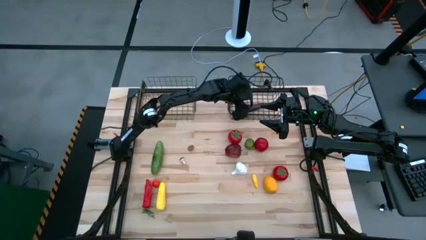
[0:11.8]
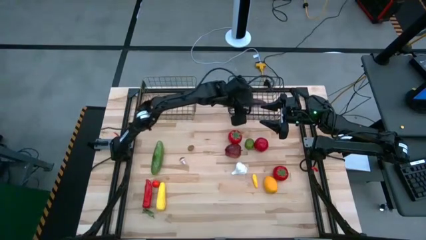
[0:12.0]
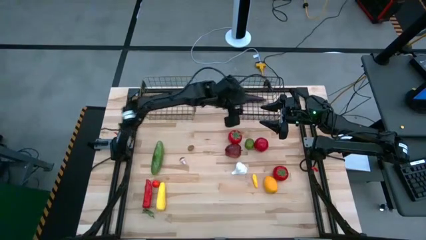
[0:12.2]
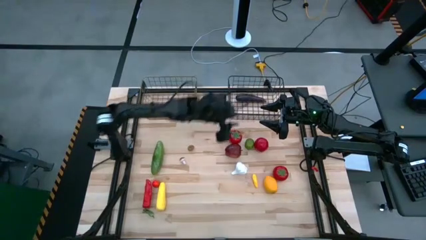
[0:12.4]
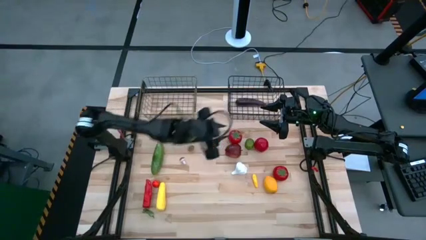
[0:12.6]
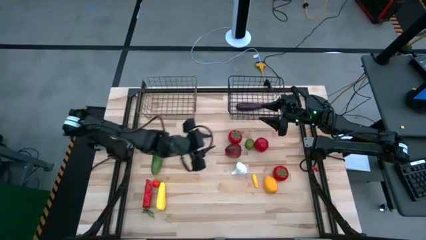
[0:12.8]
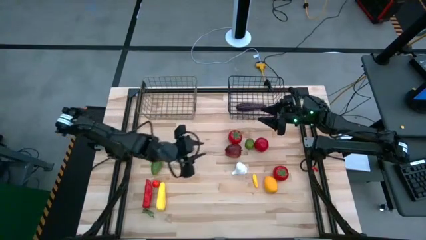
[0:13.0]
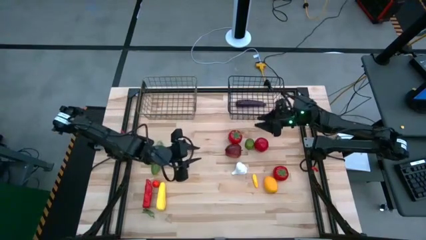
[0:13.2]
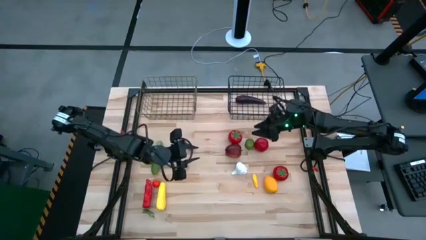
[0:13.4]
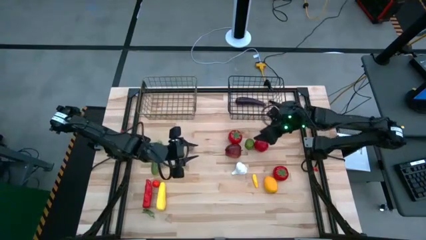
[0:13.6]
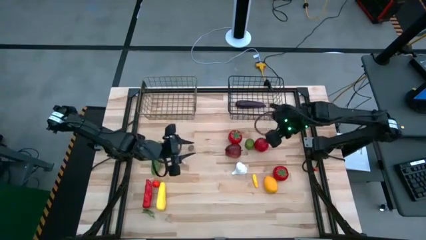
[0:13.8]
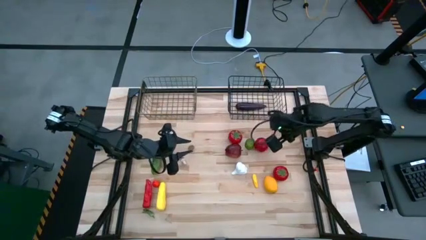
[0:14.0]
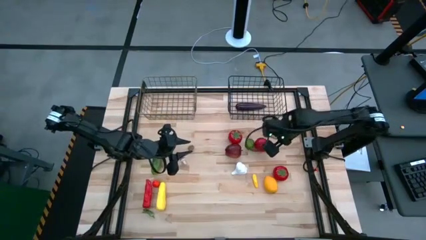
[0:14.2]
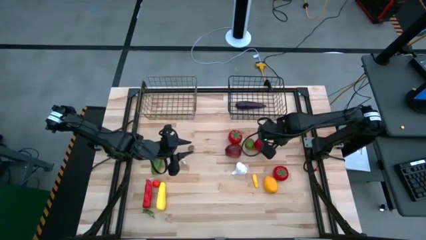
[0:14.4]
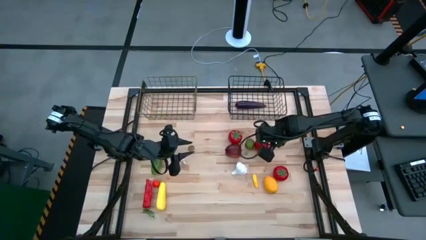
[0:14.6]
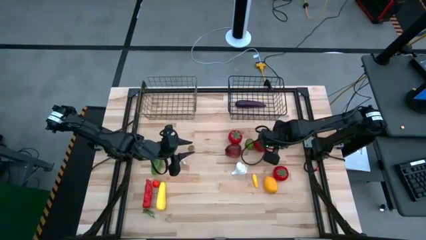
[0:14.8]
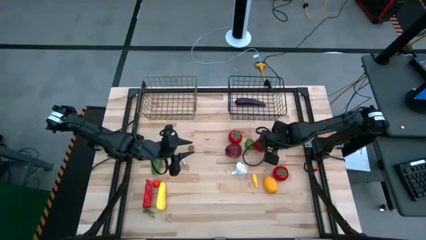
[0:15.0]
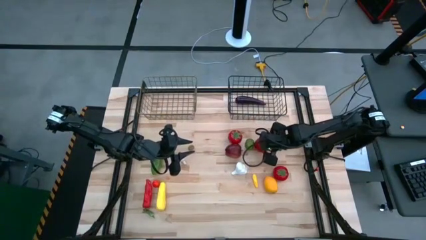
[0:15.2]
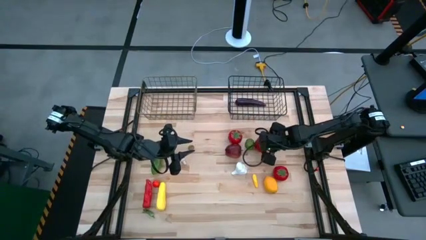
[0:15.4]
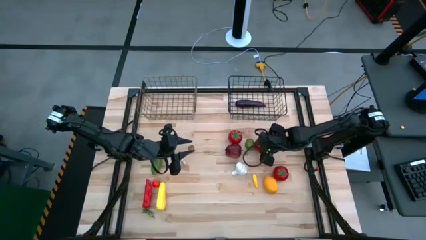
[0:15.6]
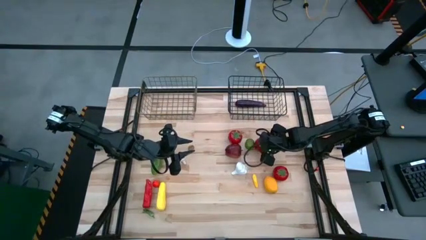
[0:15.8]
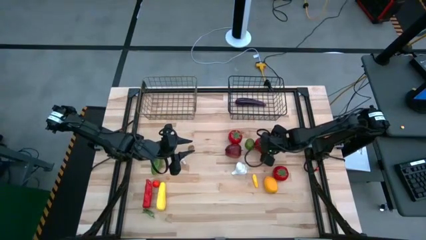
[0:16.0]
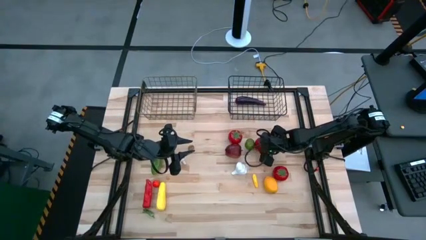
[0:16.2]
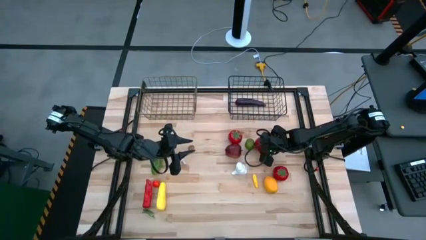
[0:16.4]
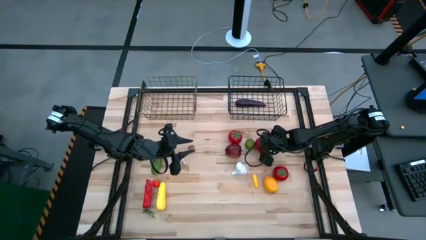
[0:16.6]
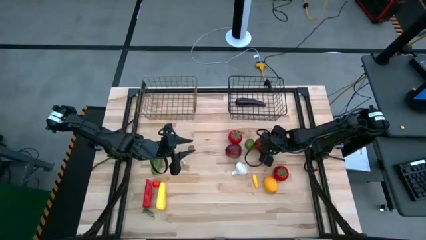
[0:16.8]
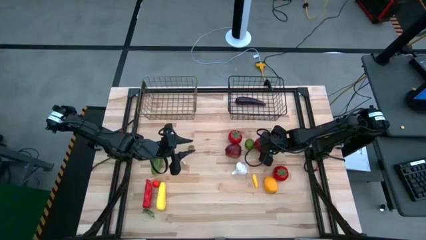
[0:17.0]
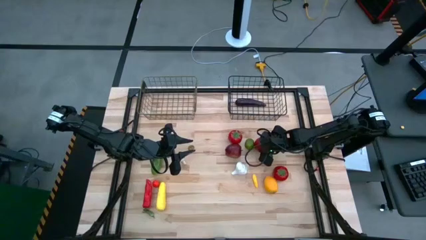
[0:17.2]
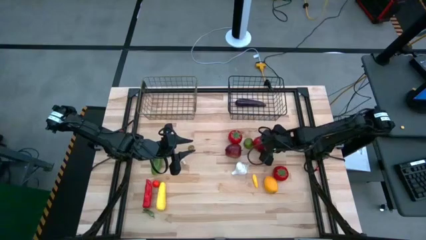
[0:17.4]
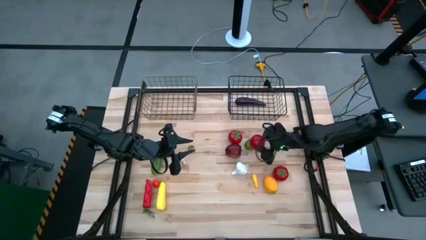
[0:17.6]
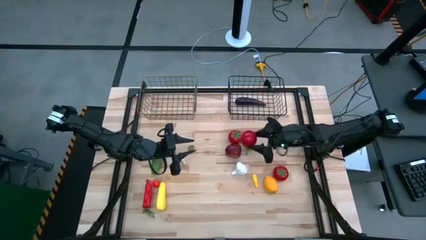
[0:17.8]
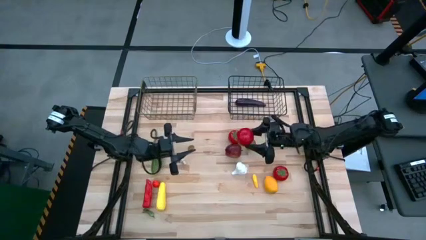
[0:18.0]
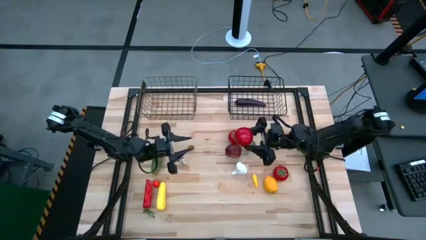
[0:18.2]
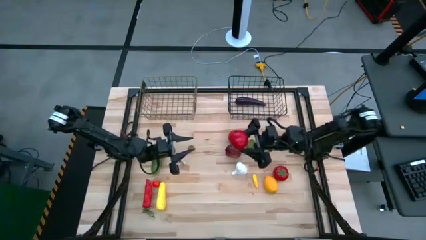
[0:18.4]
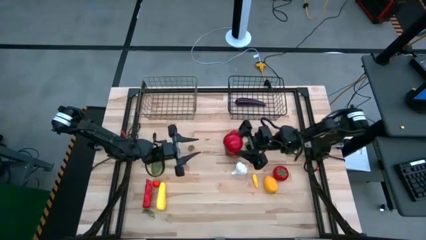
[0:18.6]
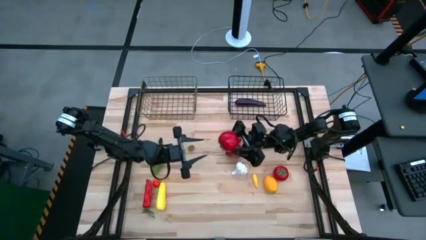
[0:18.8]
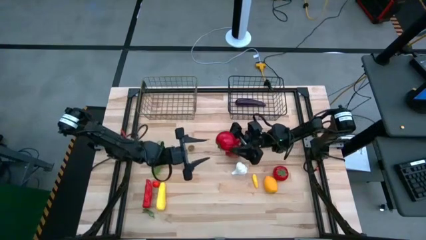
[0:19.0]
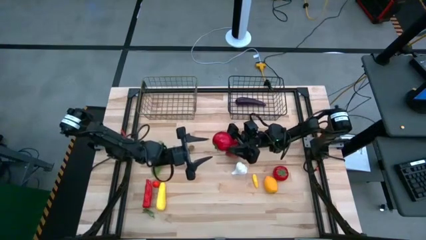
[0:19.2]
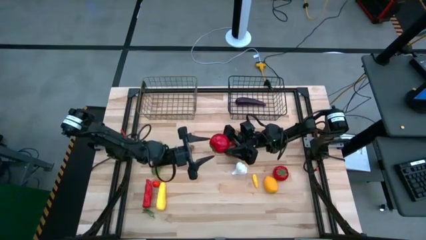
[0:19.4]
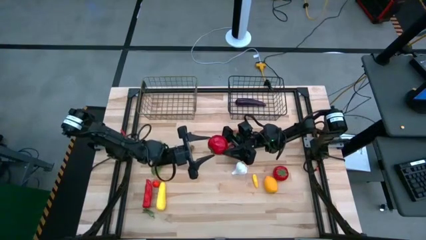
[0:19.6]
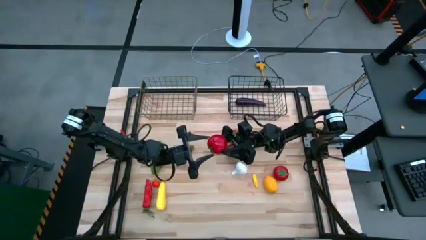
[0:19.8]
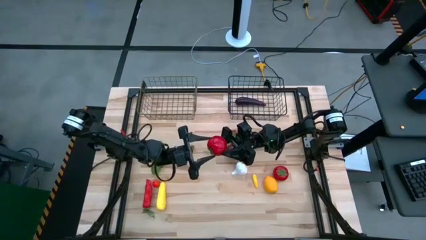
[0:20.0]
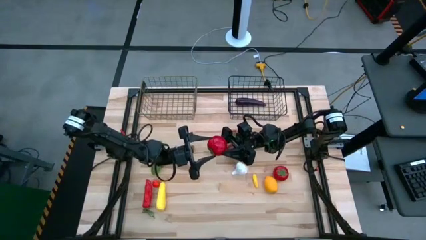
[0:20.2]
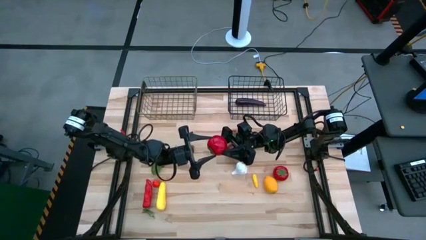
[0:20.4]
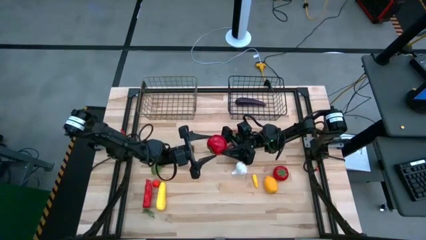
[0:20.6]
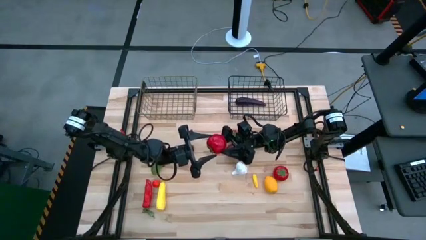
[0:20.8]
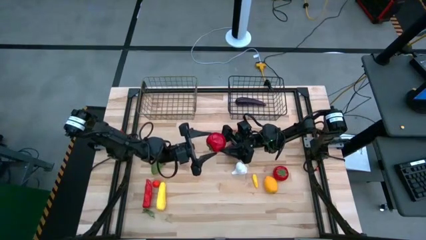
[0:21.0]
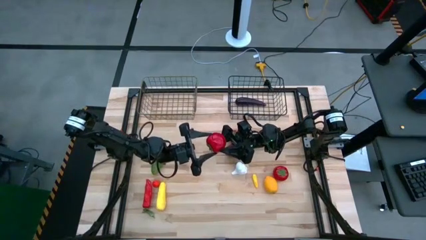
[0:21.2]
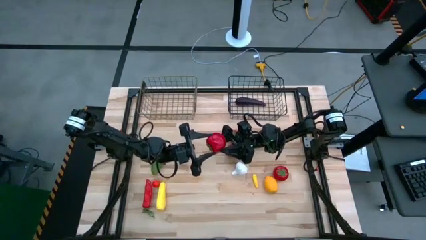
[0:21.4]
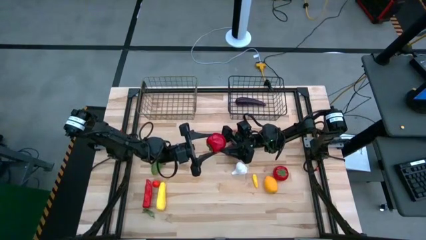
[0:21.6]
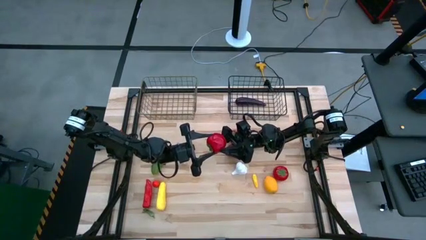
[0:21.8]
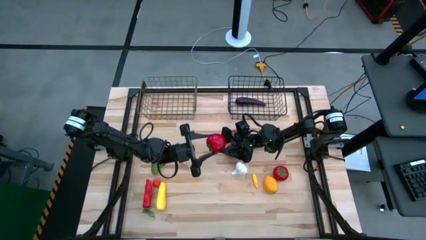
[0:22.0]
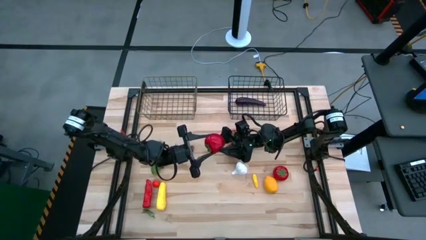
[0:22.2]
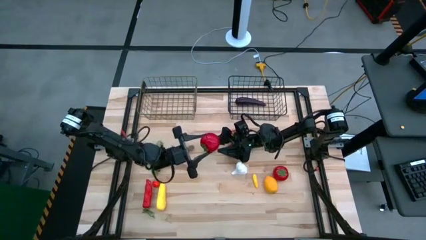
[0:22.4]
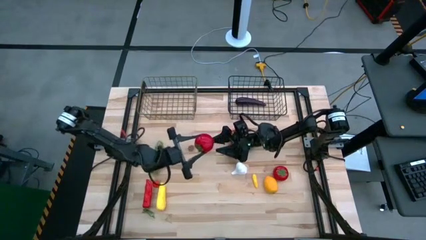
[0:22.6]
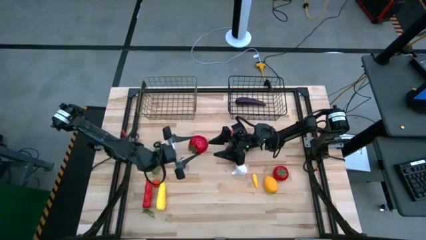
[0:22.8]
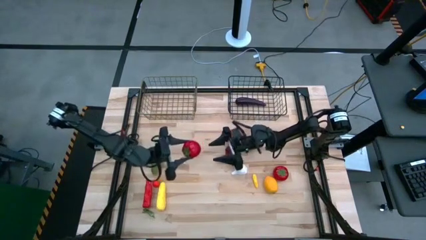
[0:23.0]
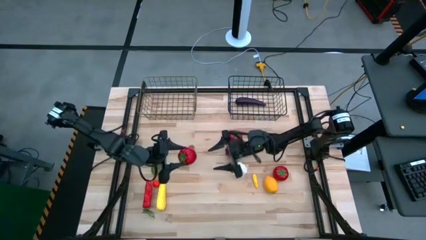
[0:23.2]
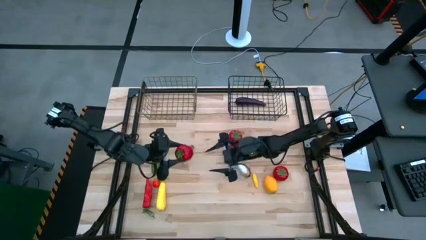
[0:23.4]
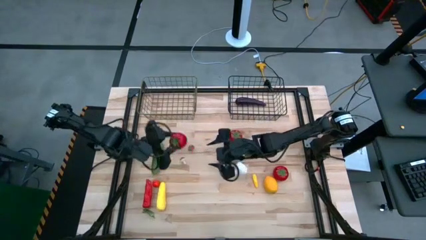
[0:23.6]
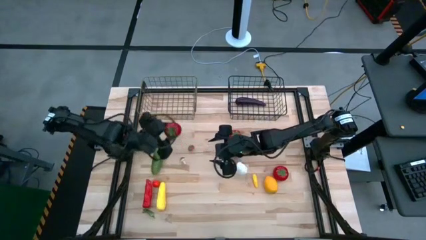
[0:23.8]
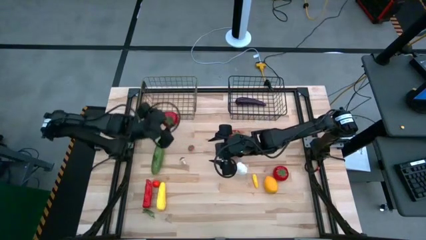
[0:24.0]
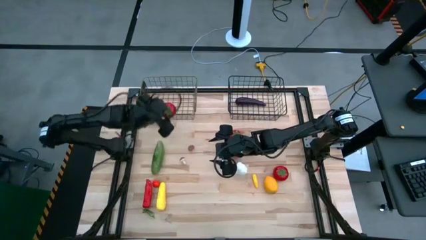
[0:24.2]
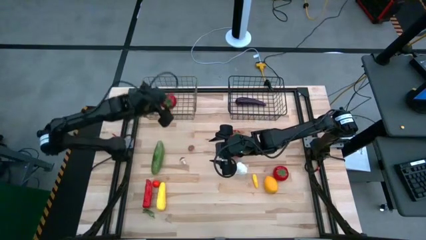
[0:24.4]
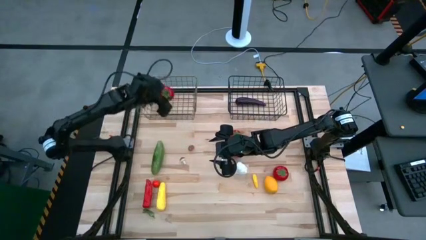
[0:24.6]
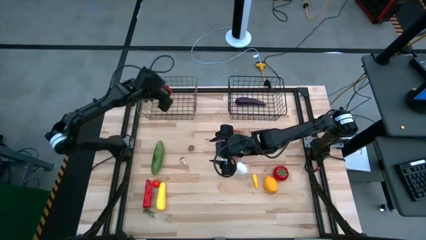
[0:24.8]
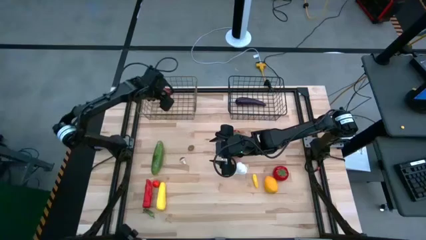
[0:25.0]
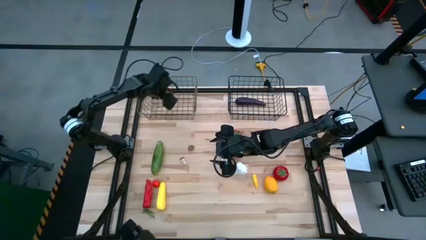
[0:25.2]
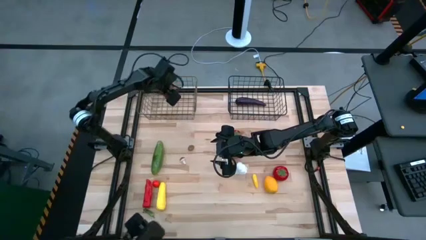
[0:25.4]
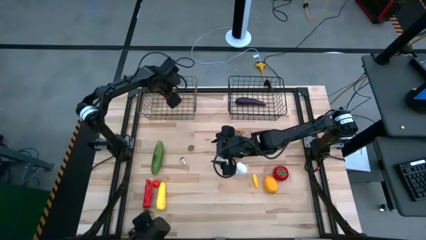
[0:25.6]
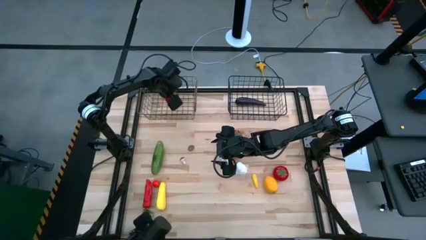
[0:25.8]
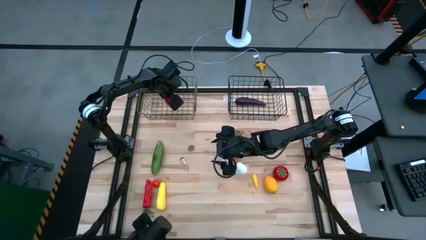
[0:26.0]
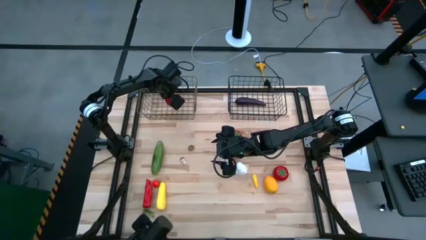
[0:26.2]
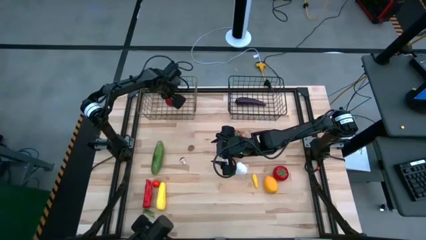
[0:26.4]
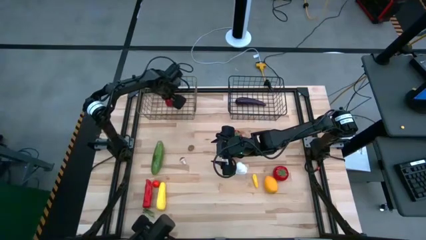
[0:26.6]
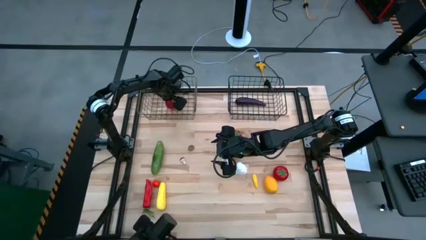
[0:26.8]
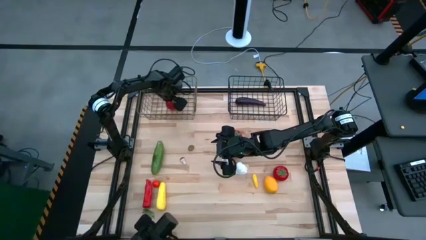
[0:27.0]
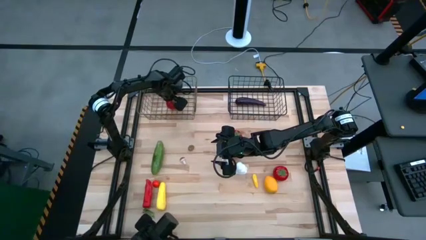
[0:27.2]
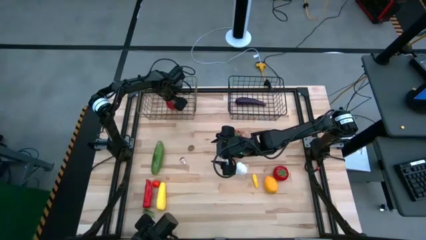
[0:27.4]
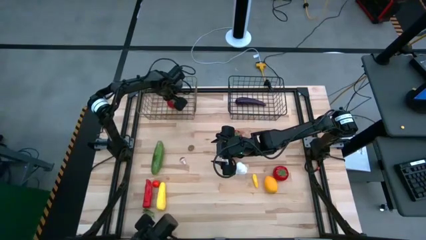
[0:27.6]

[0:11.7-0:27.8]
Task: Sort produce into baskets
Put the middle tomato into the left wire basket
